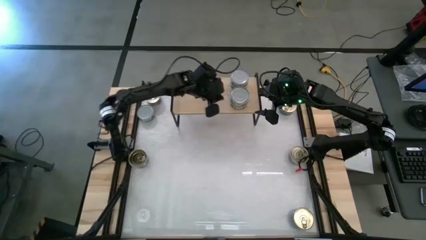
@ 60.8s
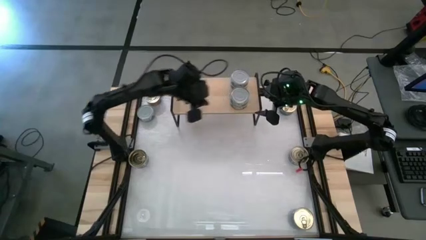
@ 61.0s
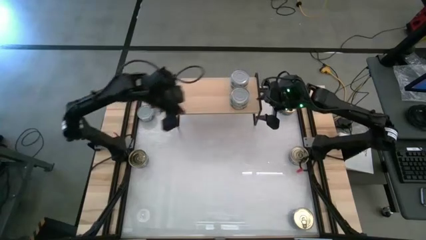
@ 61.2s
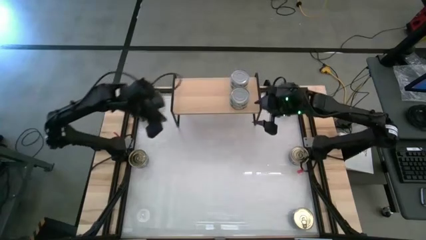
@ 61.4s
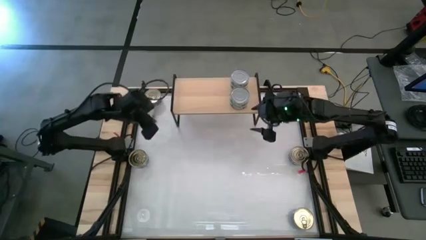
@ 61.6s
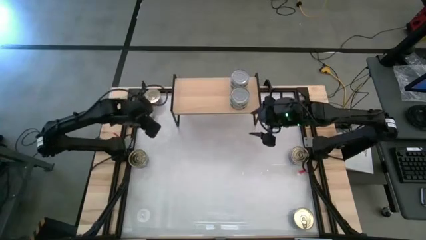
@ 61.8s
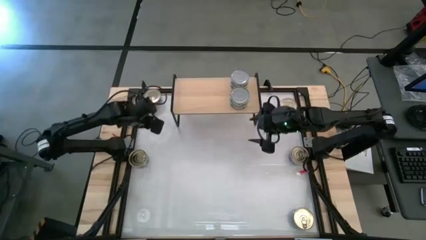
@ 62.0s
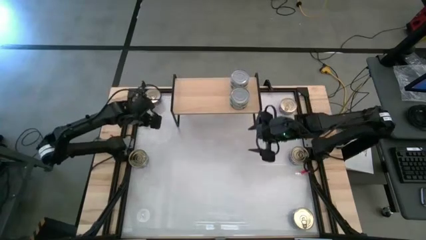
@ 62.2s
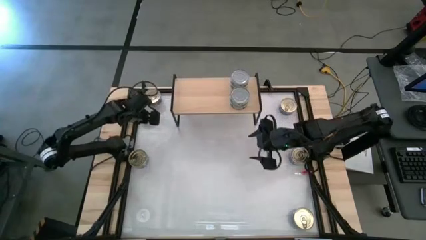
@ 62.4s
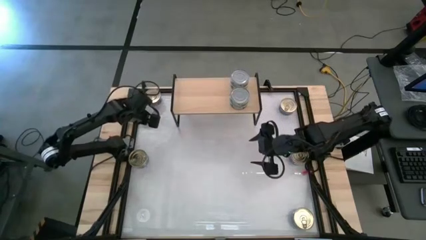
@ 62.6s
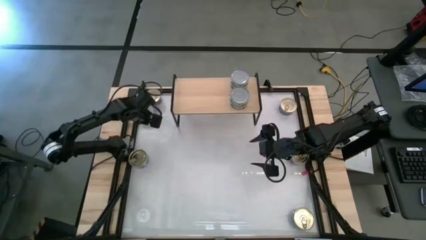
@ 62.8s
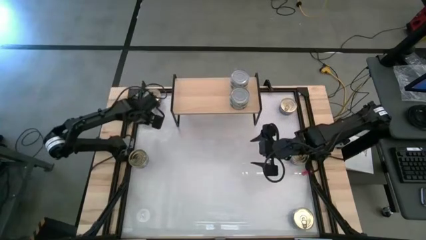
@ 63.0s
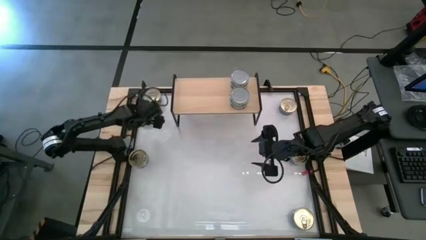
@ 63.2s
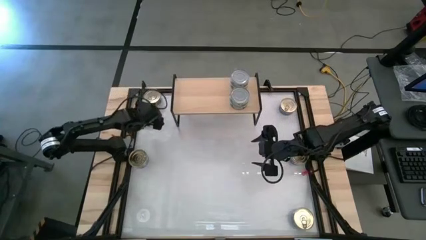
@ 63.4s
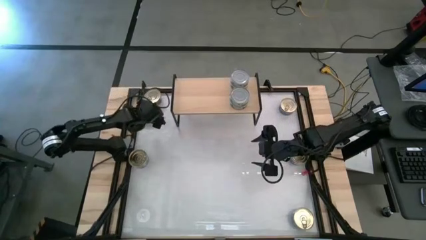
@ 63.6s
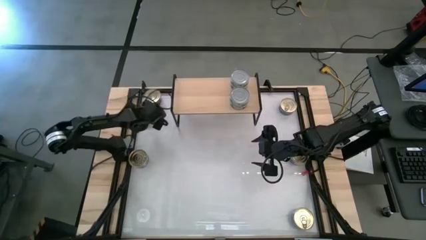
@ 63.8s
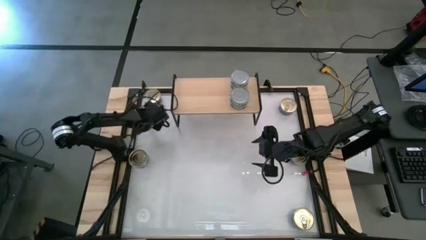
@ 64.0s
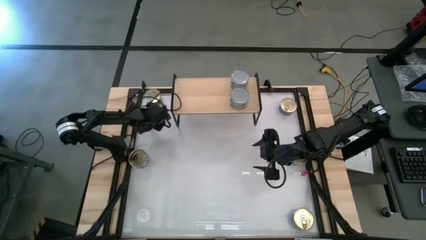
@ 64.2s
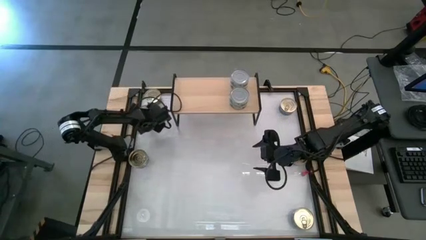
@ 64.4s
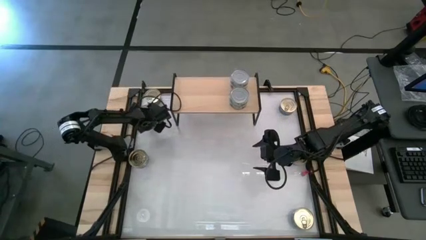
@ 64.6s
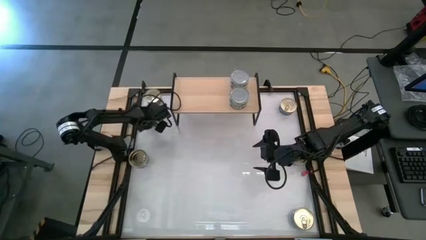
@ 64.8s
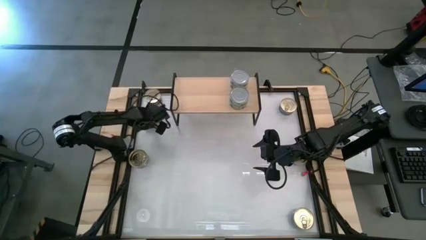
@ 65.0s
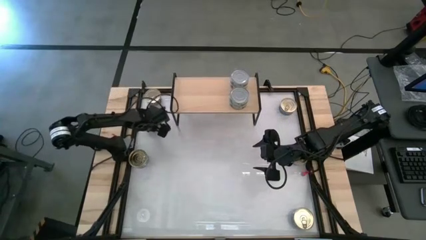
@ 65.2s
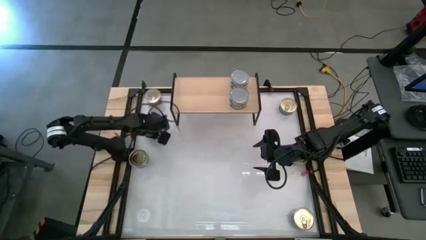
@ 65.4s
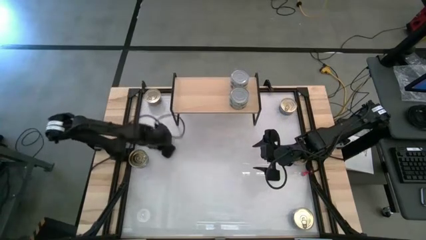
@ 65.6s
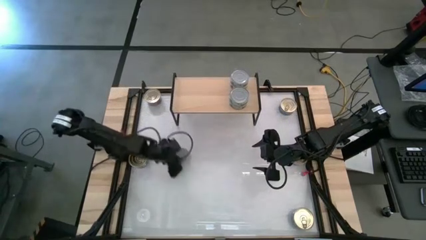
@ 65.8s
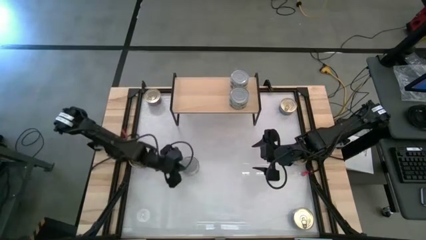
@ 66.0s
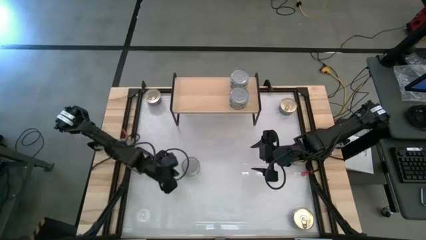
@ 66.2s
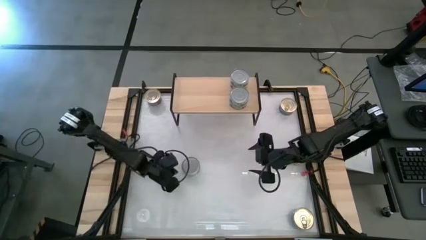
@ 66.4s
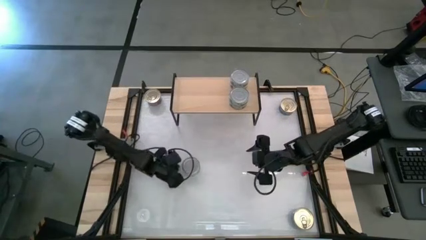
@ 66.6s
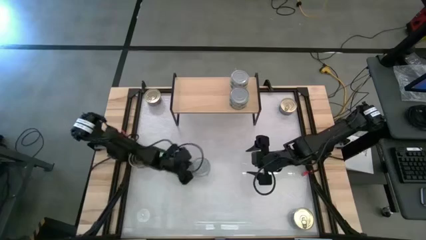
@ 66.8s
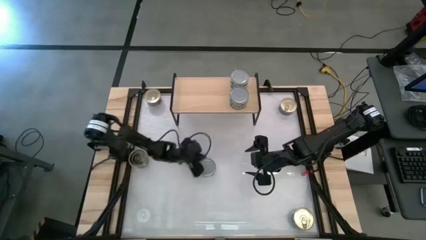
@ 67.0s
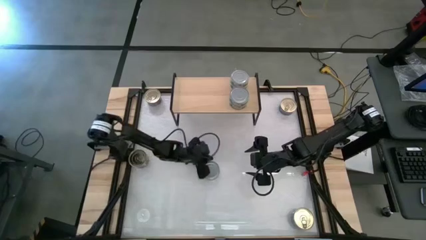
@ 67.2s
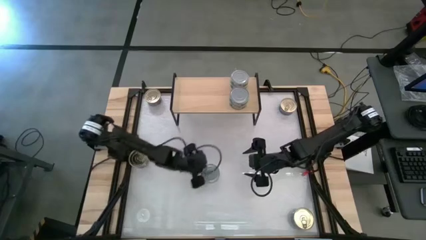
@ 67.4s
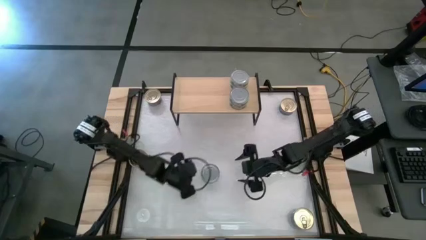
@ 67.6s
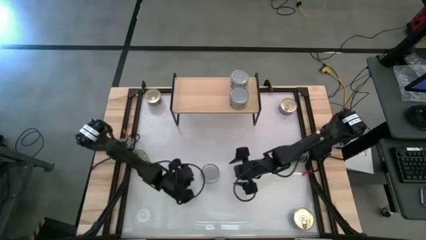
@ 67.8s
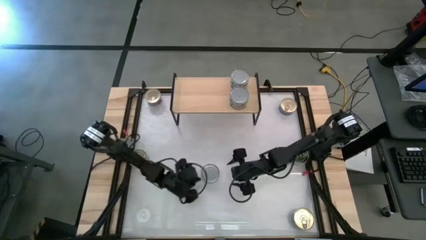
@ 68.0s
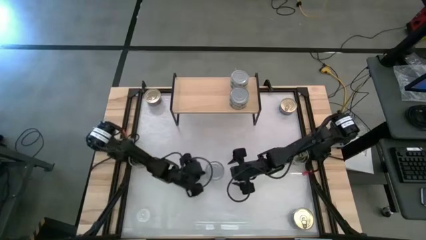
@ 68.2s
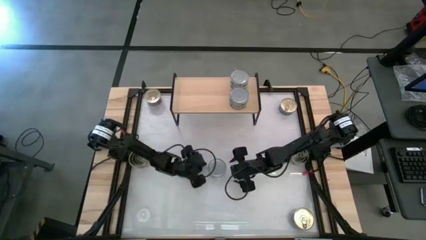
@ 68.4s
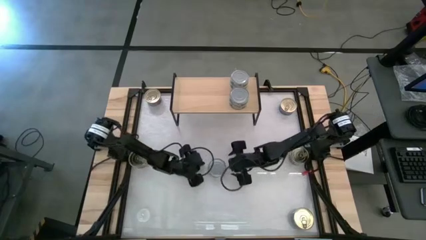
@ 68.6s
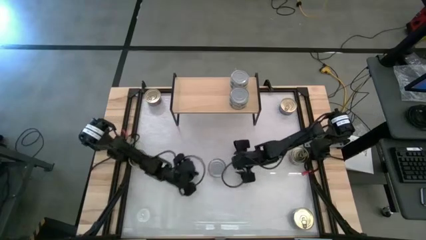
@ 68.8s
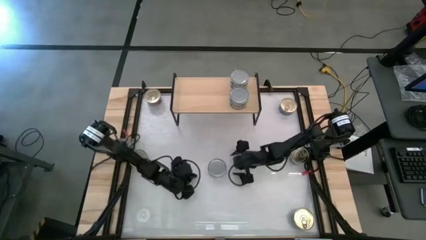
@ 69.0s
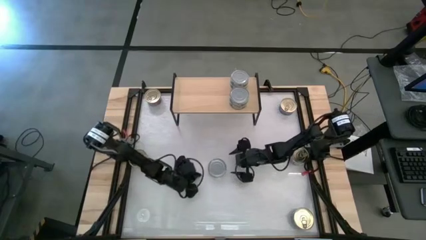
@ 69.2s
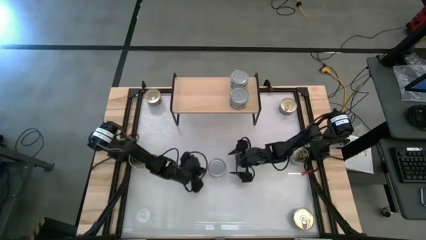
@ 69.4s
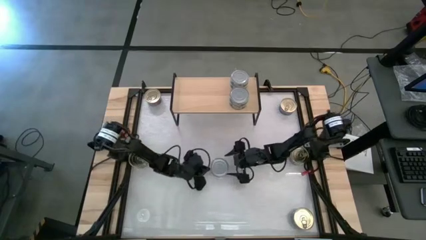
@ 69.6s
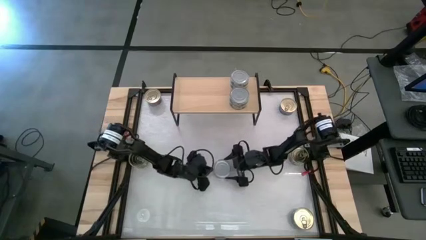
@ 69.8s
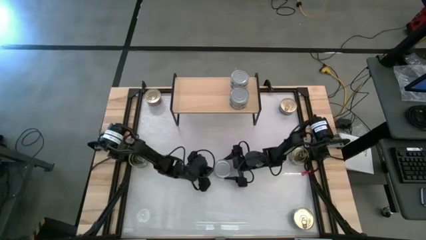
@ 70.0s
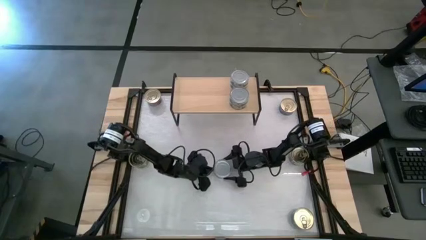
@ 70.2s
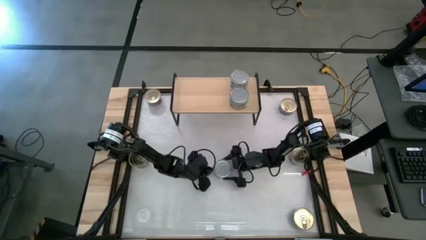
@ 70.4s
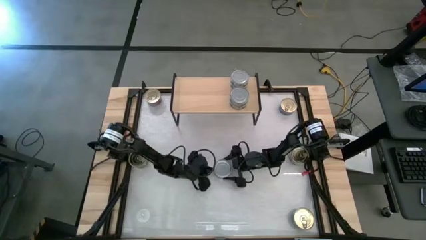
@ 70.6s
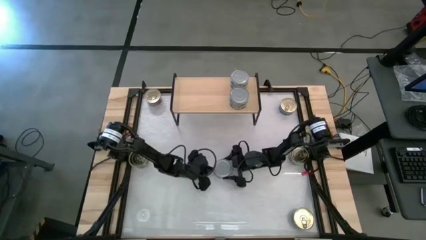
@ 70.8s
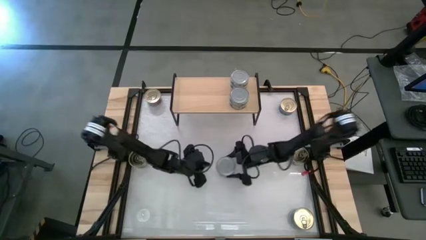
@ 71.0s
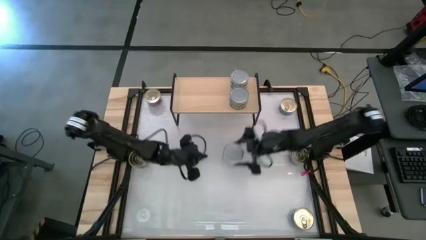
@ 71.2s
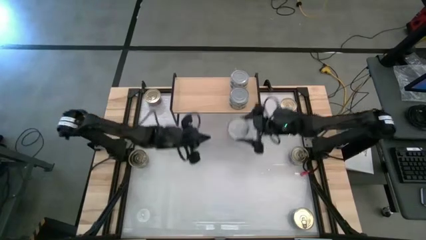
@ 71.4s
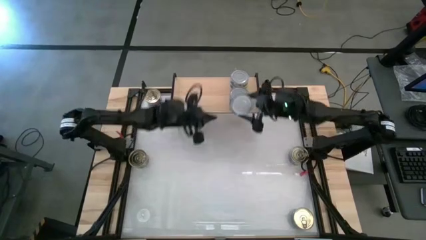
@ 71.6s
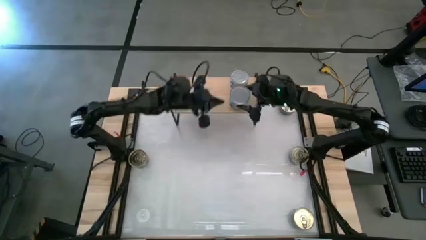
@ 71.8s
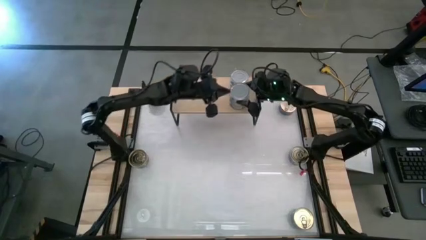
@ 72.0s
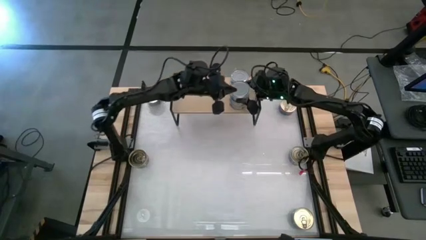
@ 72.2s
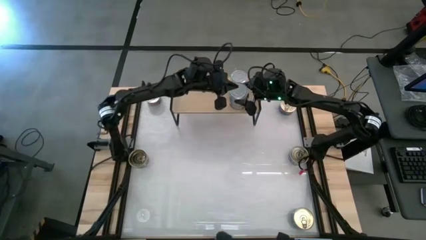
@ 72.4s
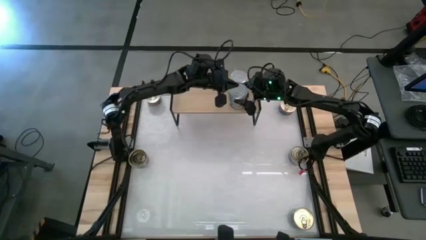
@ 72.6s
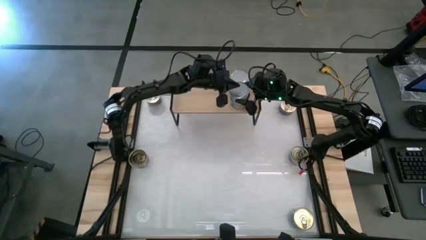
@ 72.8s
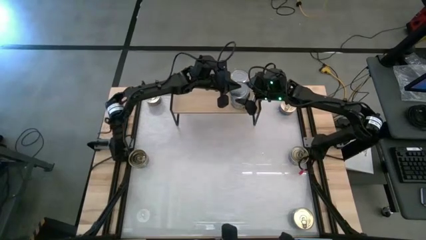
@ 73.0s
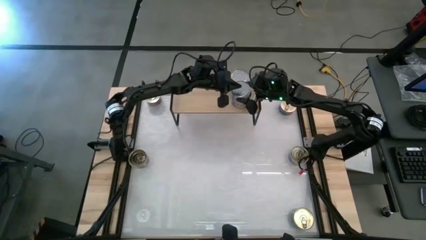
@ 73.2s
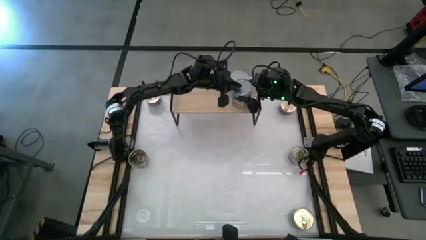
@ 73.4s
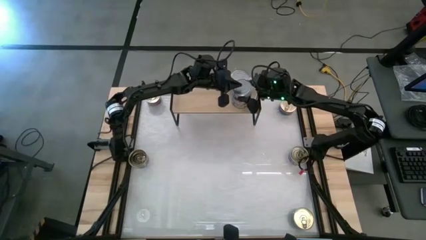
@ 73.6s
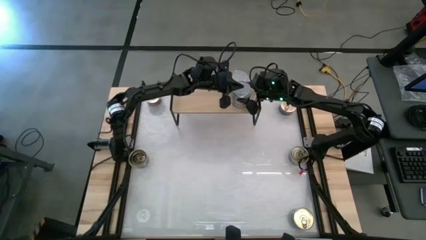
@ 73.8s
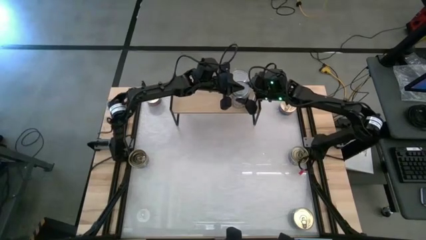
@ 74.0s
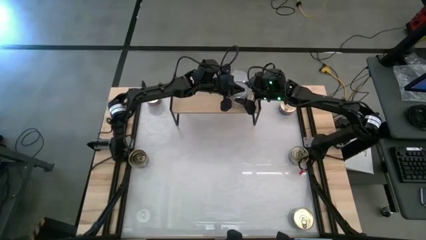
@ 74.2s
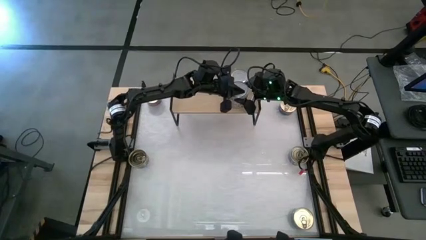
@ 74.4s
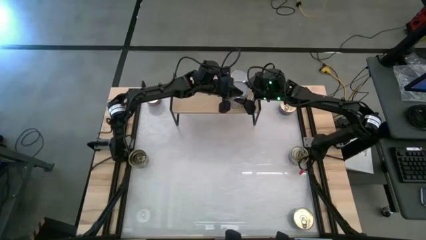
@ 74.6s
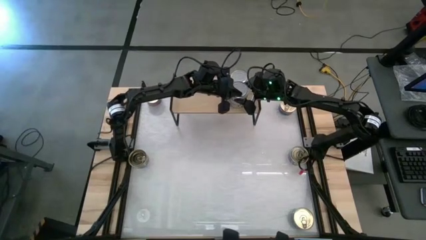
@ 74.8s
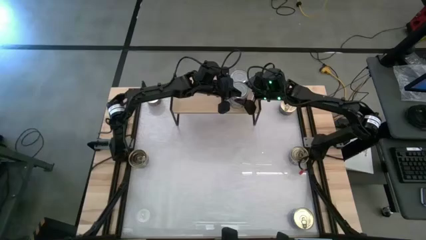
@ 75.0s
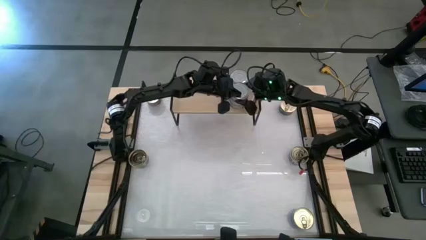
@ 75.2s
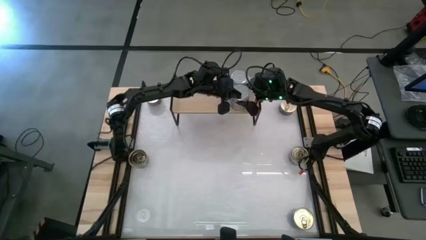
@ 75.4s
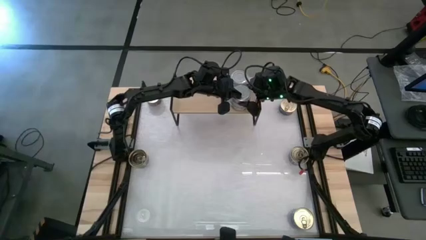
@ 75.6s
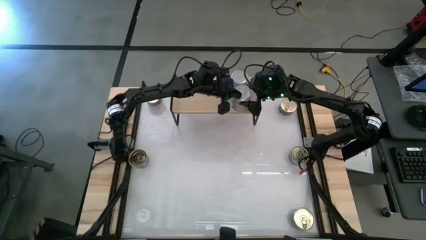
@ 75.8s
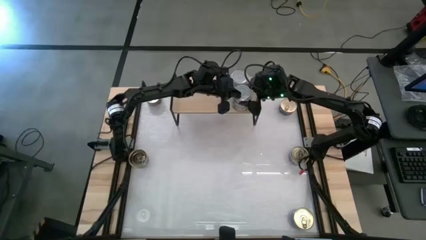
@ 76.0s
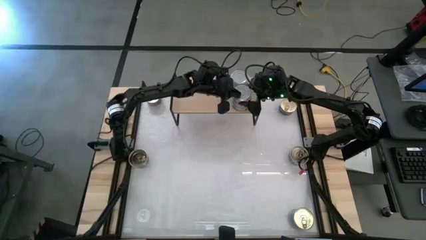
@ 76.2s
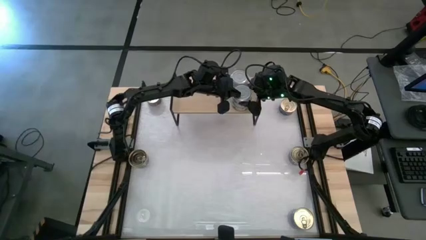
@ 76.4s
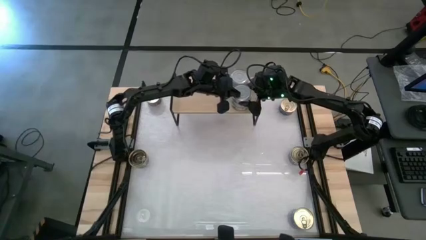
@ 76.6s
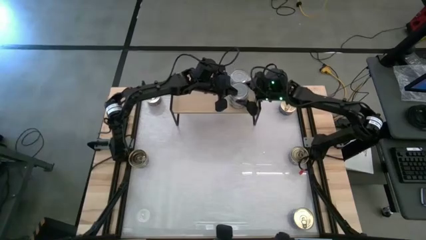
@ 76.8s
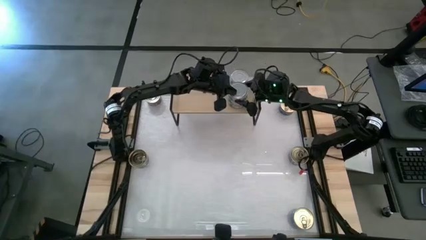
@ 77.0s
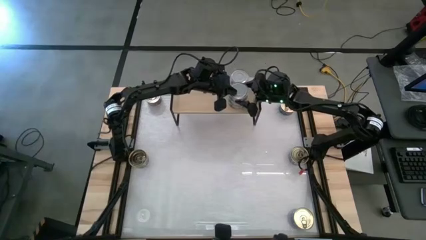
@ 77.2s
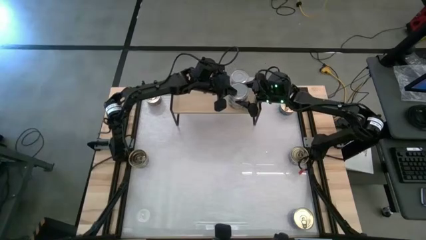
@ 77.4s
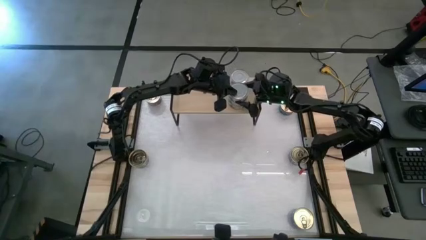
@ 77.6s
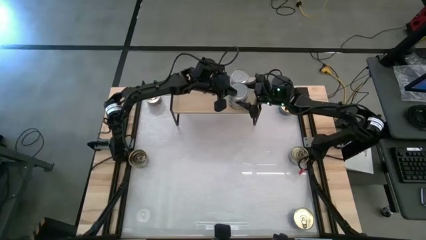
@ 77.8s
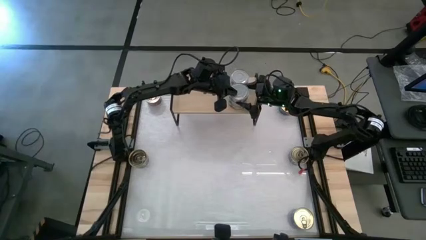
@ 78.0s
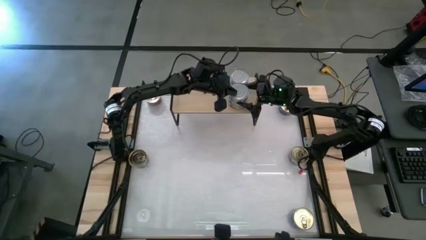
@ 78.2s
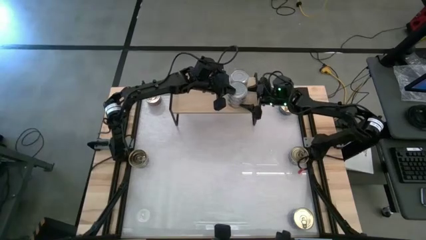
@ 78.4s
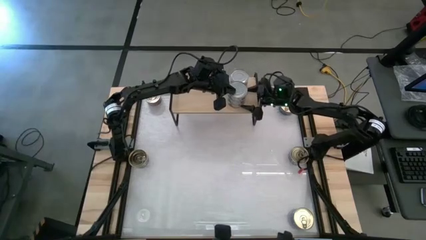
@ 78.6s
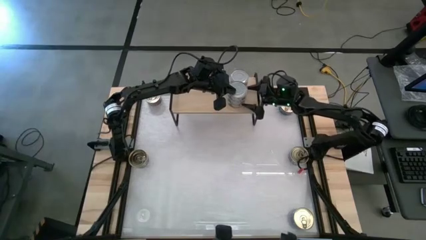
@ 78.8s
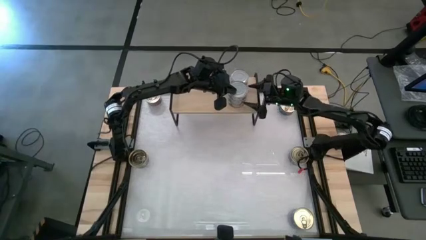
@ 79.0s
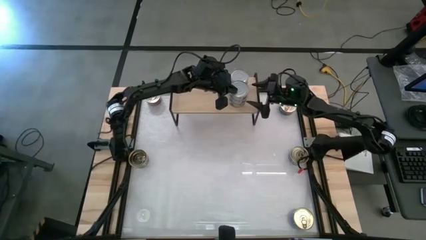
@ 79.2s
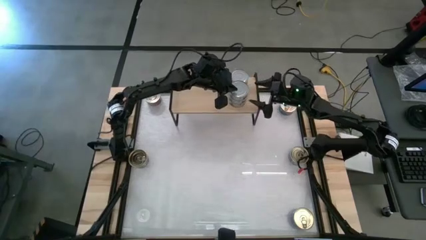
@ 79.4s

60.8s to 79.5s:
Task: Stack canned seafood by type on shelf
Stack the green tuna can on top of the green tuna can
